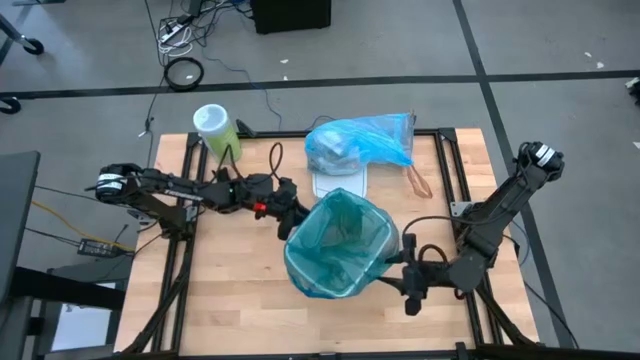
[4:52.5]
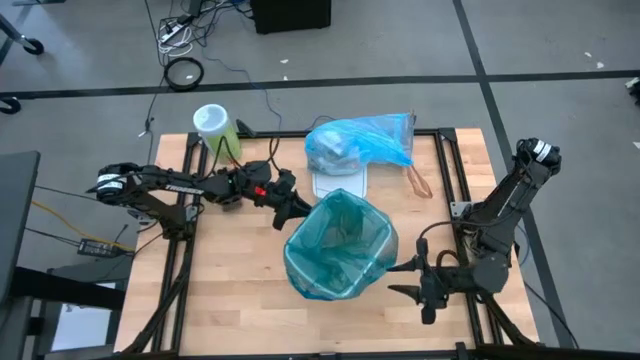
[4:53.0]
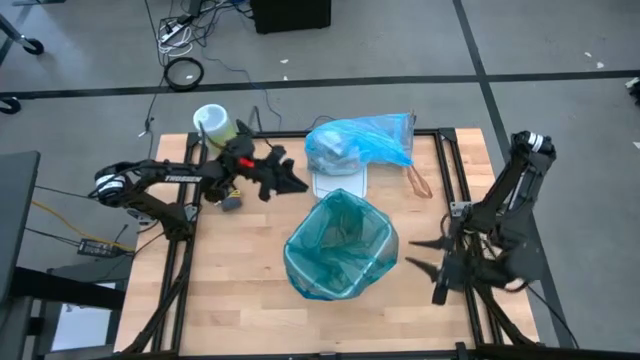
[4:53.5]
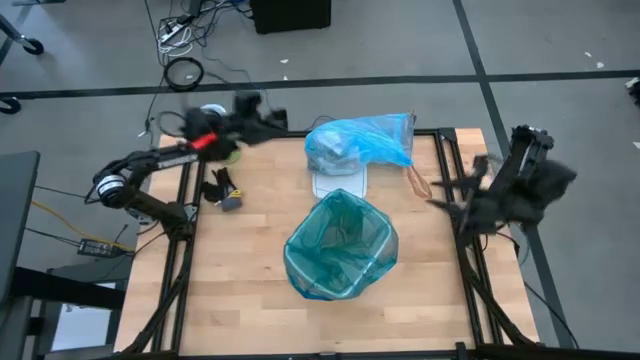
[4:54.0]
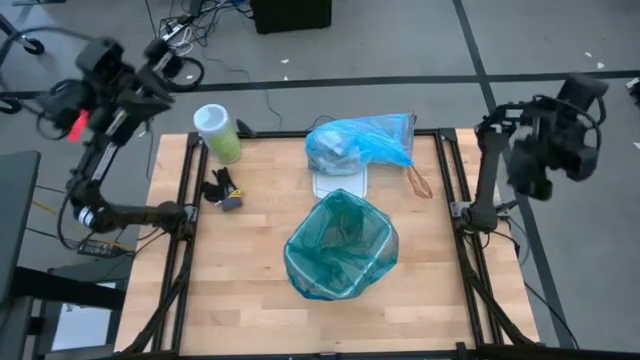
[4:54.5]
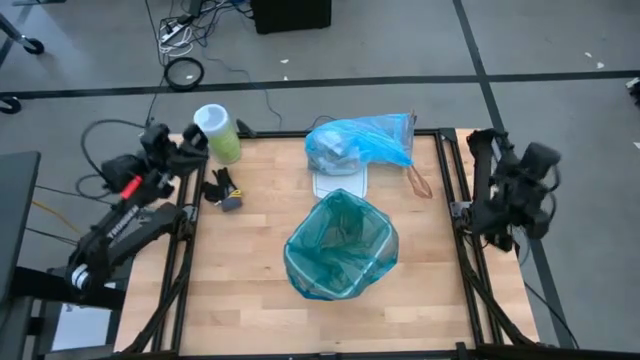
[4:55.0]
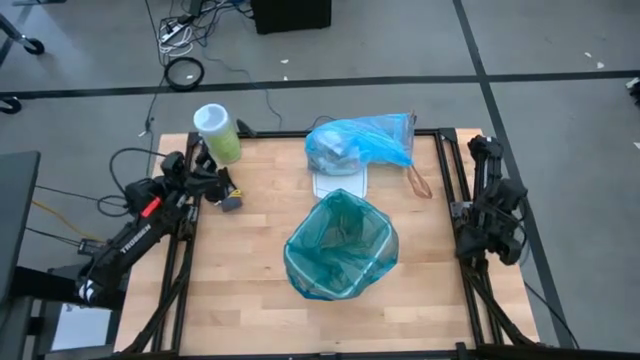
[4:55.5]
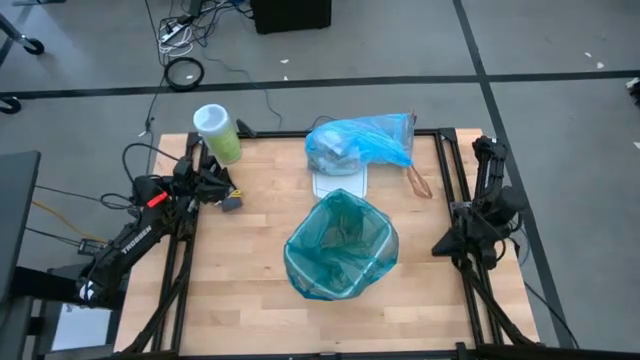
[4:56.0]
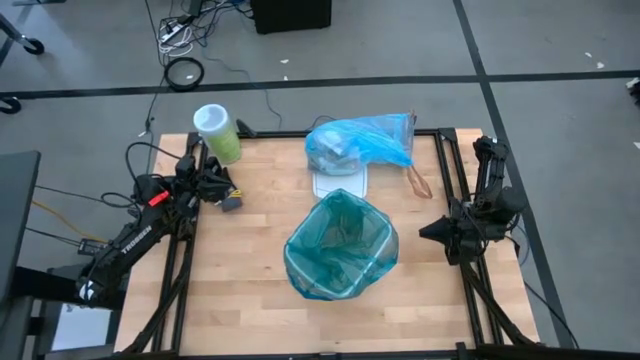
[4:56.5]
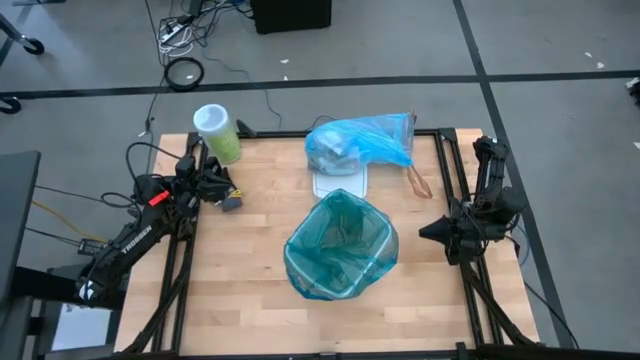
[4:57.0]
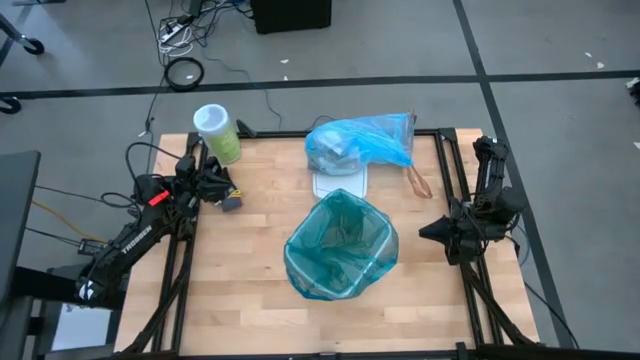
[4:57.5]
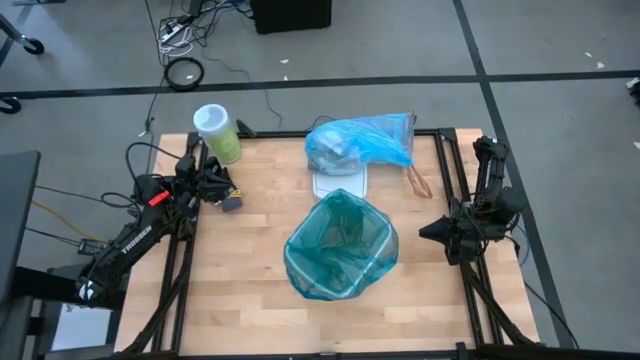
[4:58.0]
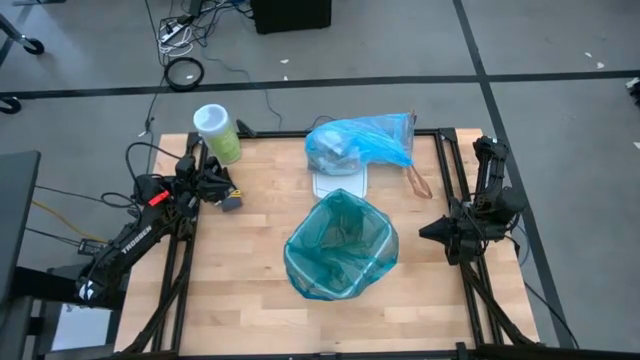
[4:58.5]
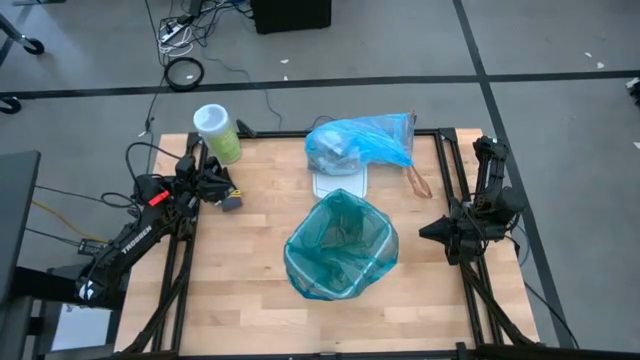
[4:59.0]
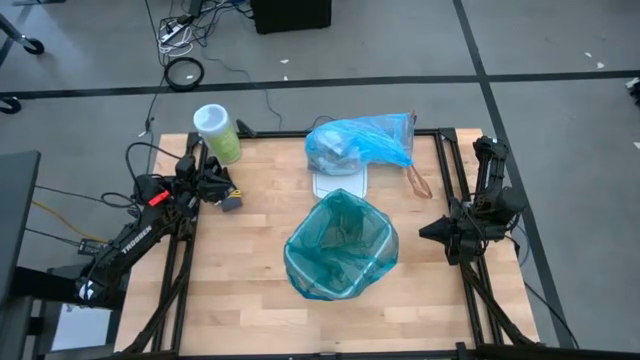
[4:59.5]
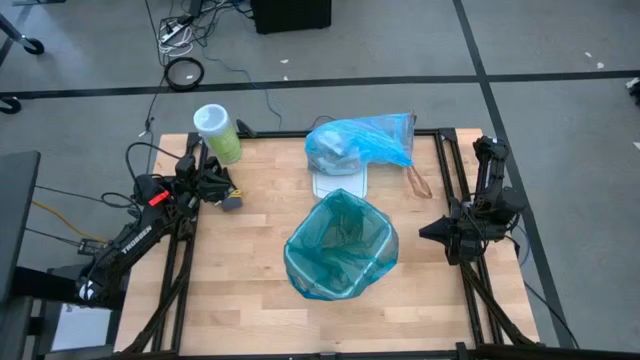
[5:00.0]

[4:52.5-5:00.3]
Task: place trash/remove bag and relplace
Return to Home Position

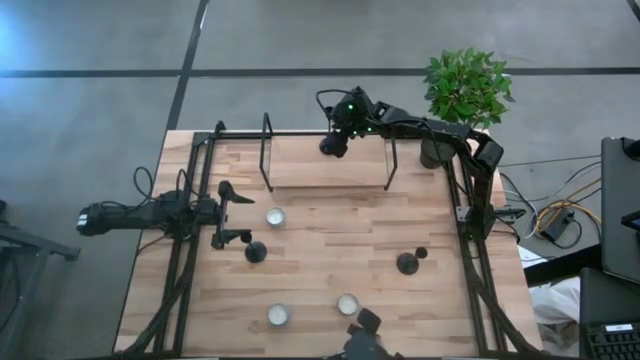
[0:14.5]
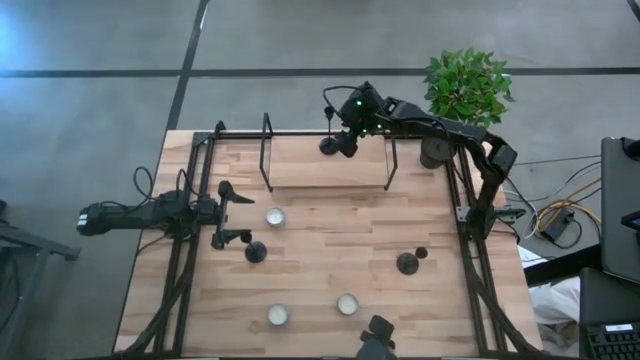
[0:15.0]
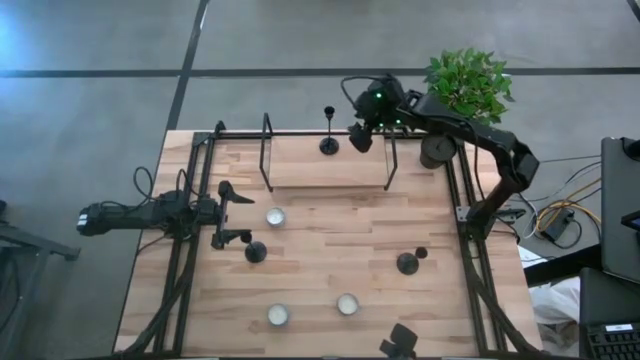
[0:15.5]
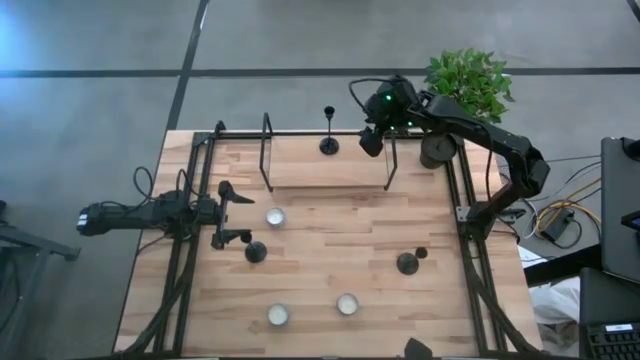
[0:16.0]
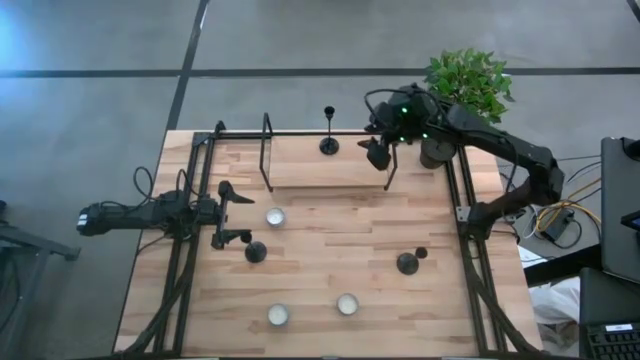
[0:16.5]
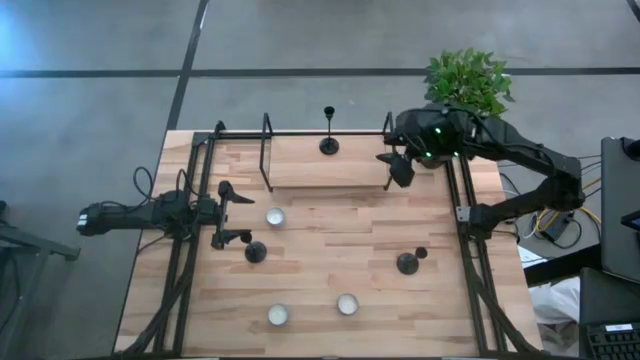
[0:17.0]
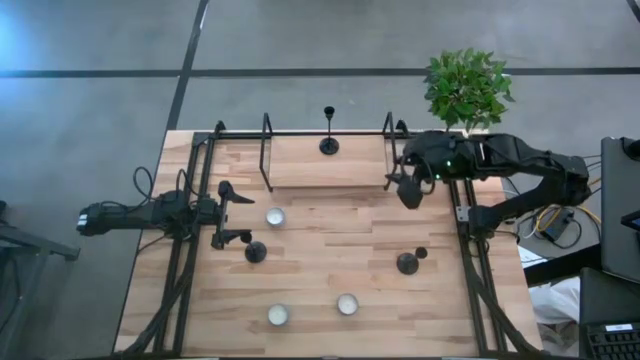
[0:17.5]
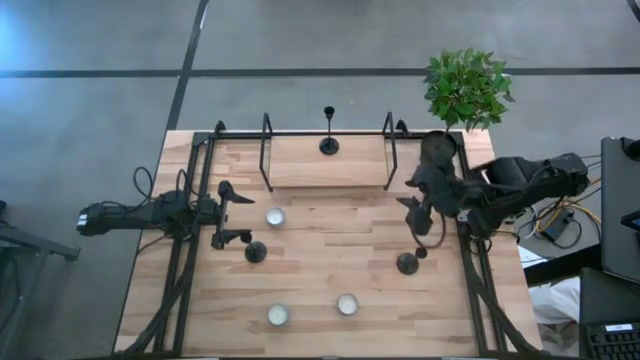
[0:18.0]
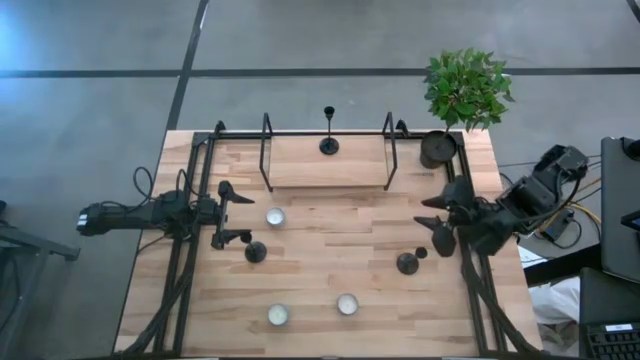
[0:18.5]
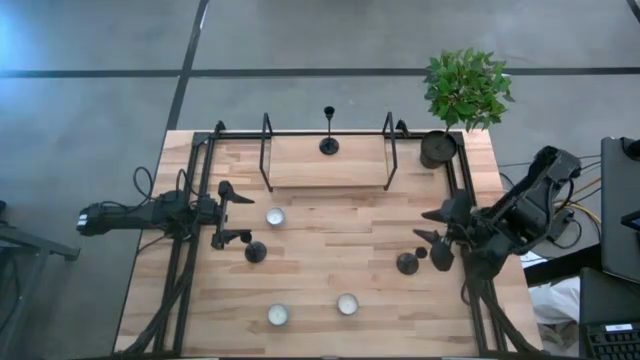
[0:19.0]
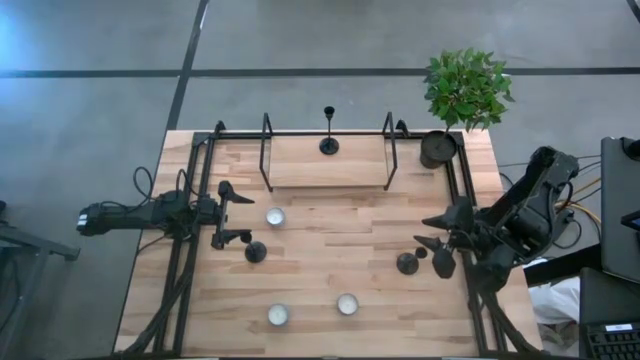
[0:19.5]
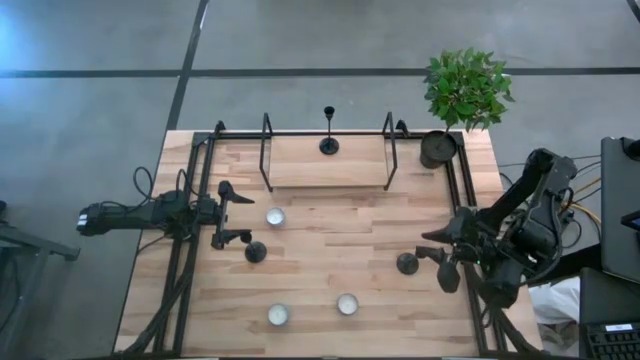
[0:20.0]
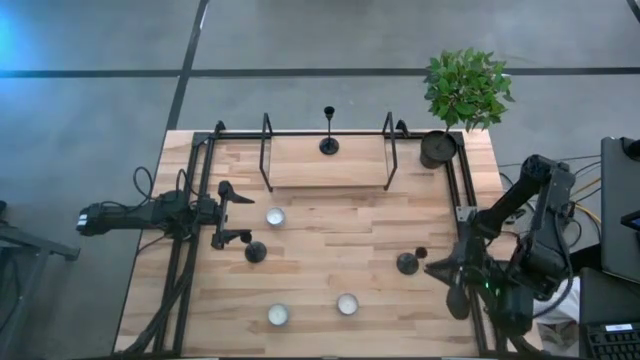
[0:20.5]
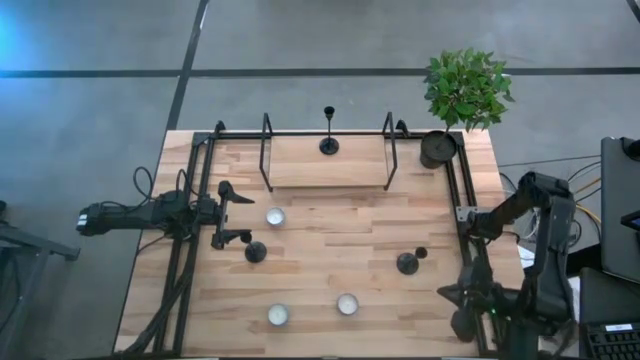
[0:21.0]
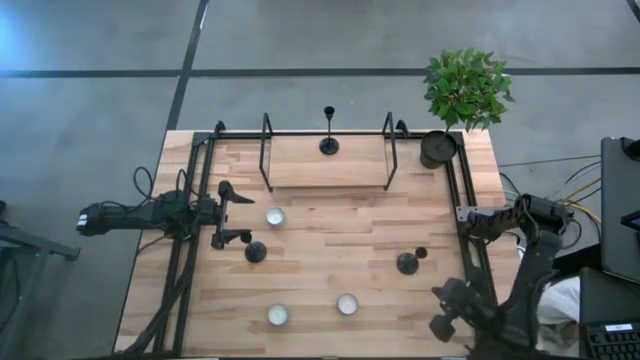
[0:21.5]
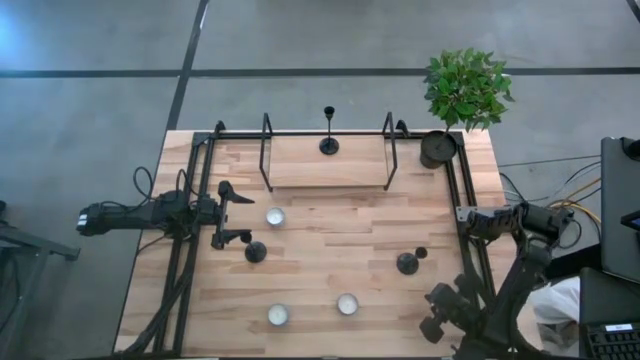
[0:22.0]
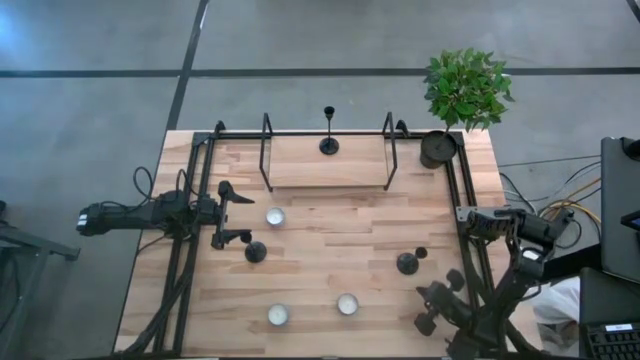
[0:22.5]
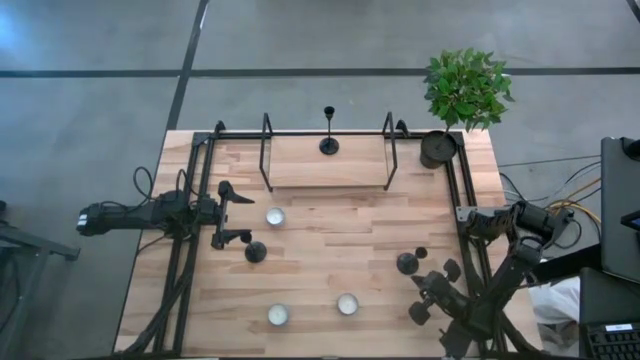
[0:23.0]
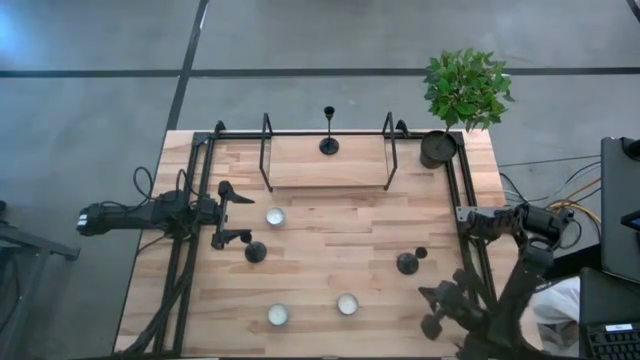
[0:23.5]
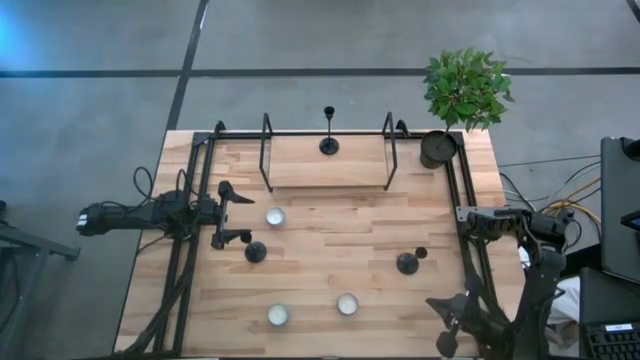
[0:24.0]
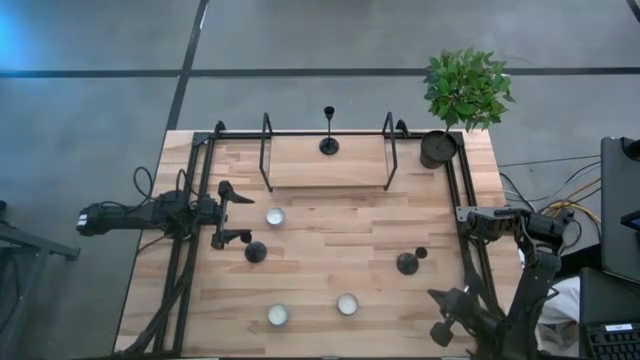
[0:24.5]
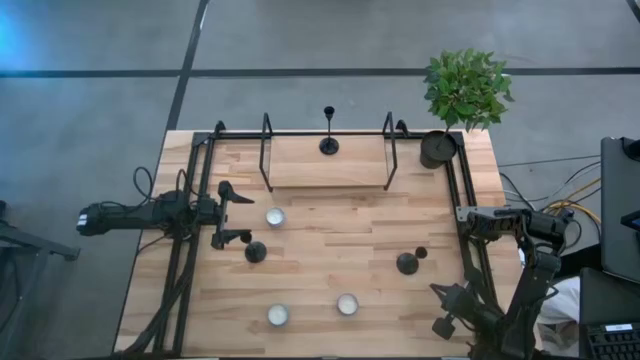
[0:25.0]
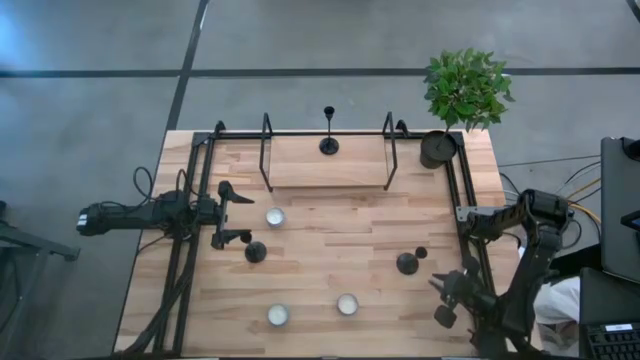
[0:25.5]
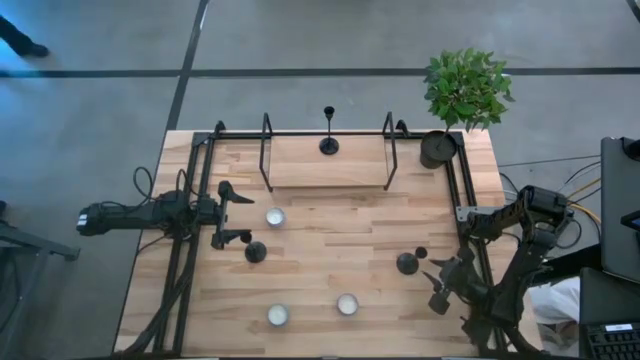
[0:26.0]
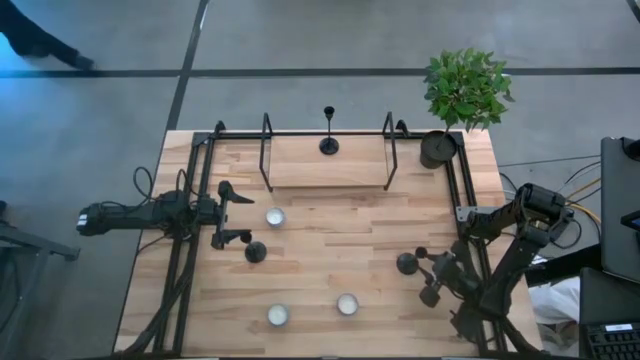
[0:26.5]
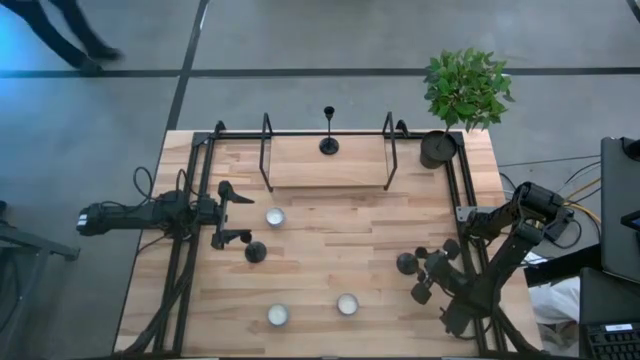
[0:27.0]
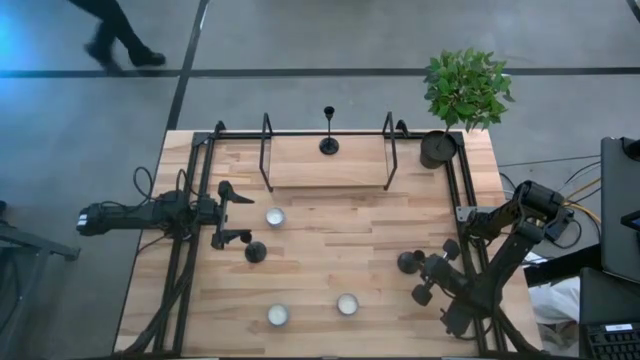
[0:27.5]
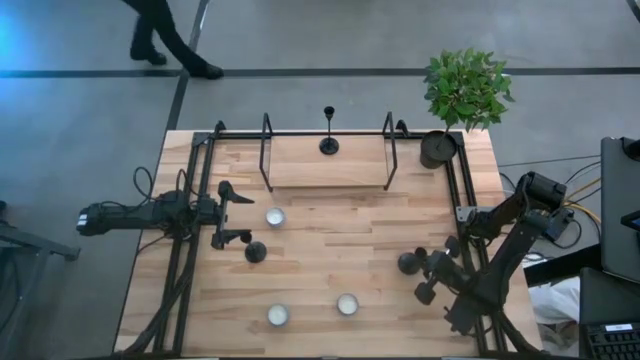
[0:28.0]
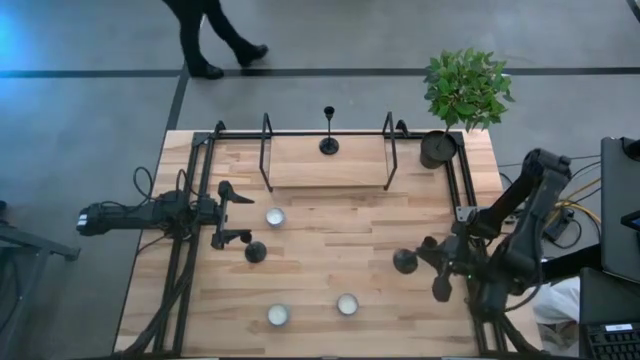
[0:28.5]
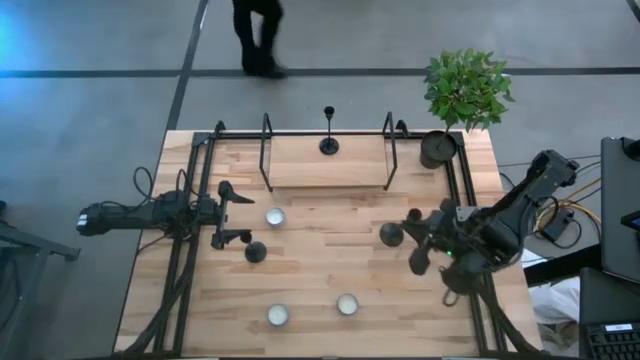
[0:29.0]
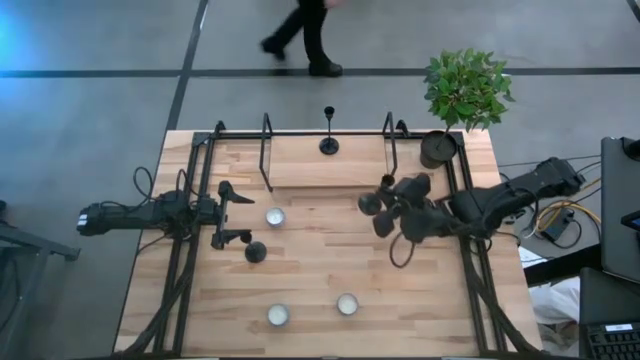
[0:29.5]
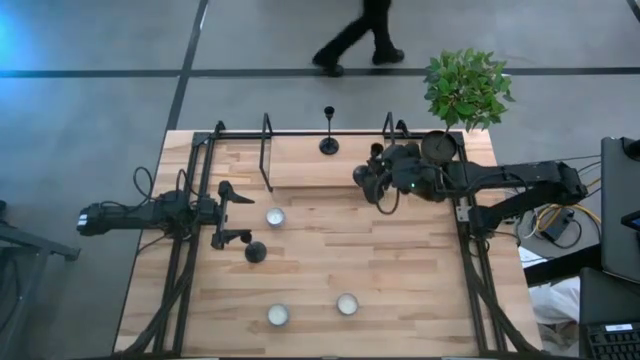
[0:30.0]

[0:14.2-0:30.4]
Task: Pick & Place candle stick holders
Put the right black candle holder on the shelf
